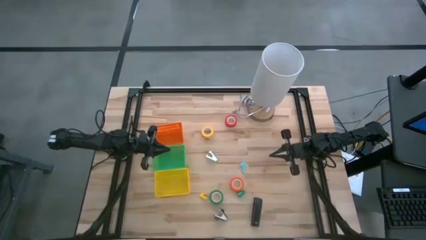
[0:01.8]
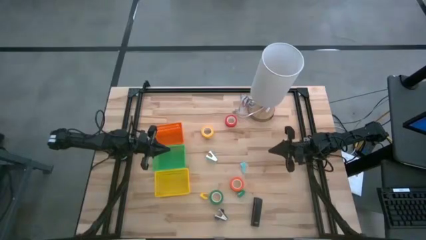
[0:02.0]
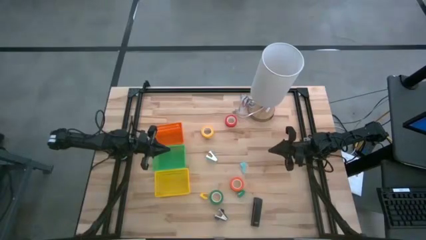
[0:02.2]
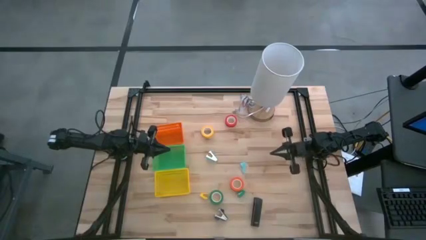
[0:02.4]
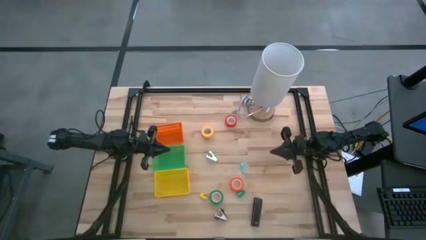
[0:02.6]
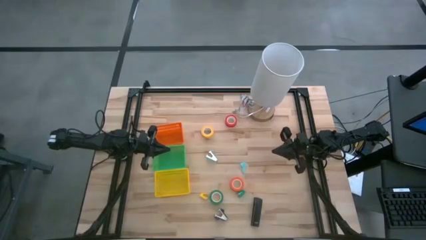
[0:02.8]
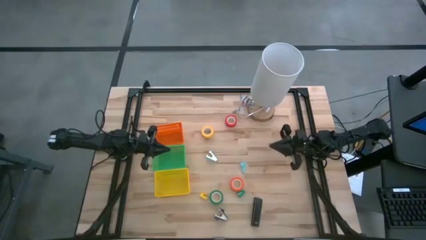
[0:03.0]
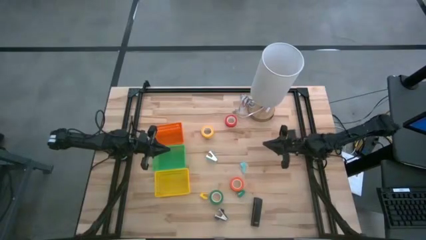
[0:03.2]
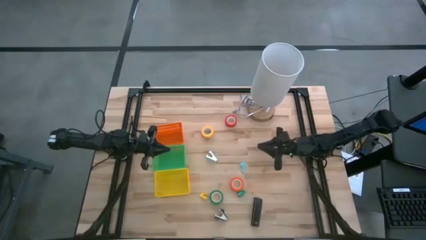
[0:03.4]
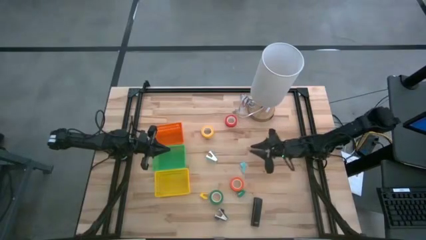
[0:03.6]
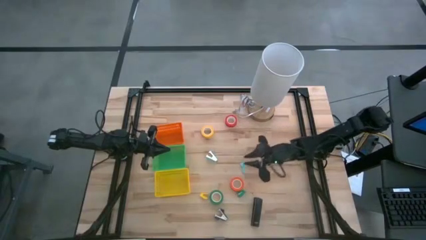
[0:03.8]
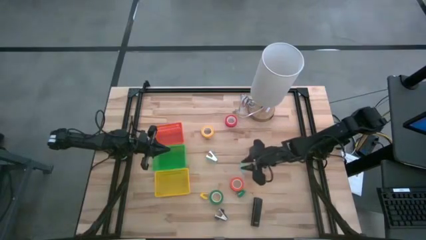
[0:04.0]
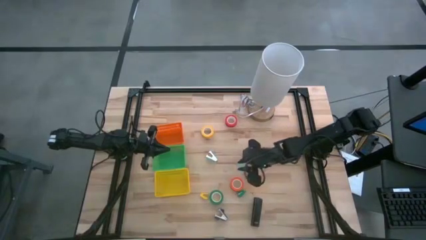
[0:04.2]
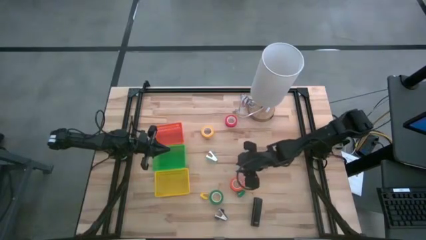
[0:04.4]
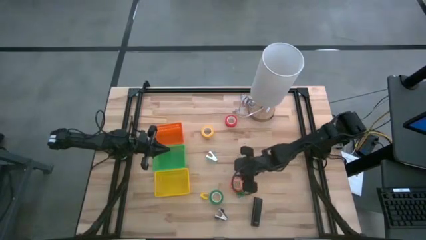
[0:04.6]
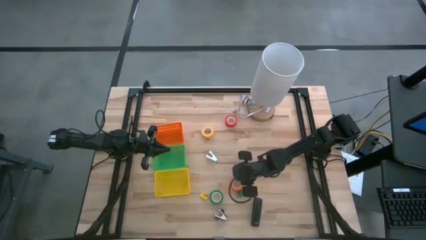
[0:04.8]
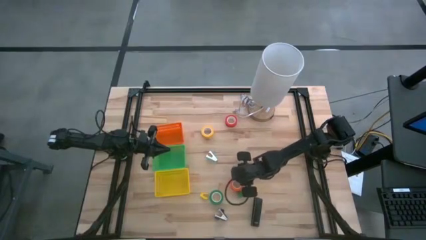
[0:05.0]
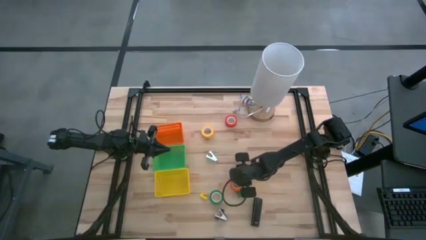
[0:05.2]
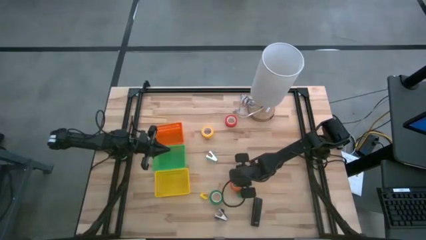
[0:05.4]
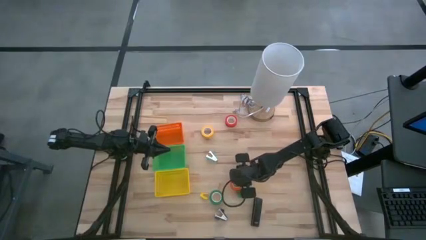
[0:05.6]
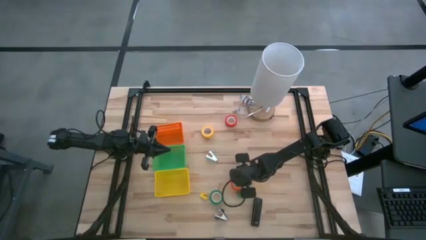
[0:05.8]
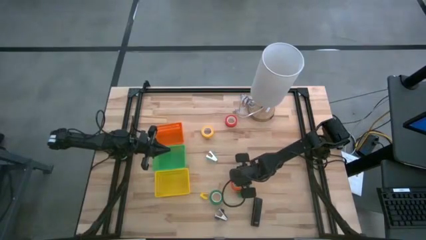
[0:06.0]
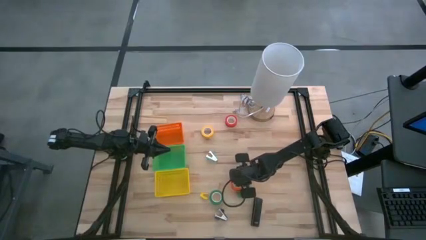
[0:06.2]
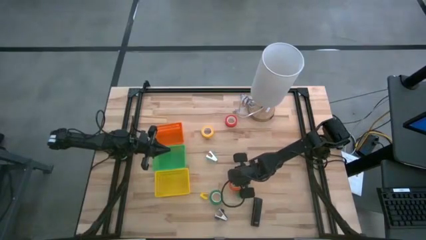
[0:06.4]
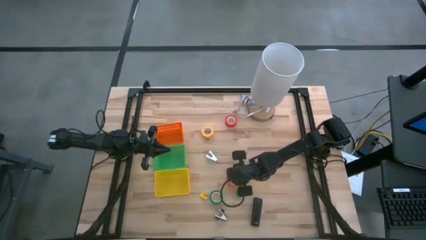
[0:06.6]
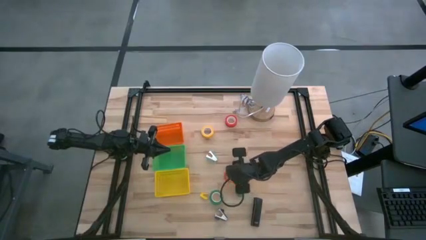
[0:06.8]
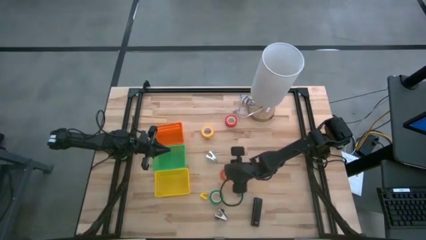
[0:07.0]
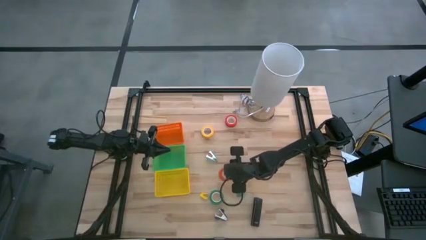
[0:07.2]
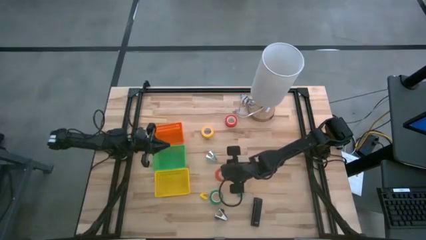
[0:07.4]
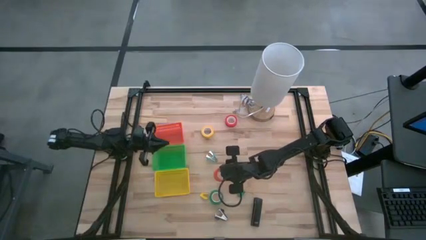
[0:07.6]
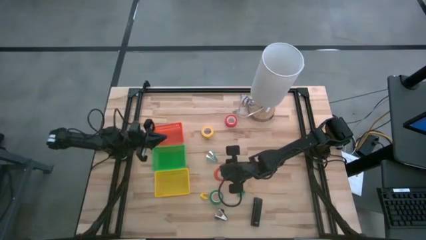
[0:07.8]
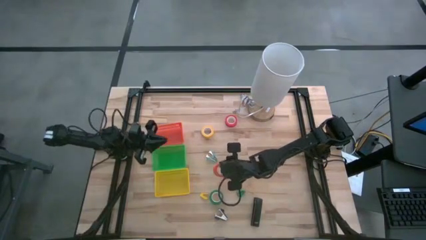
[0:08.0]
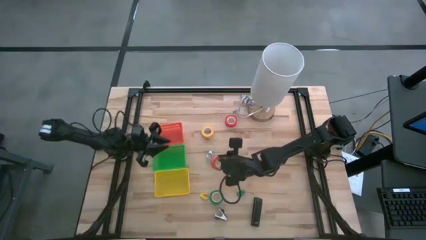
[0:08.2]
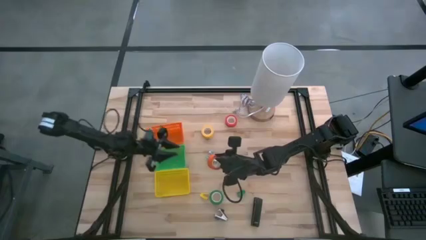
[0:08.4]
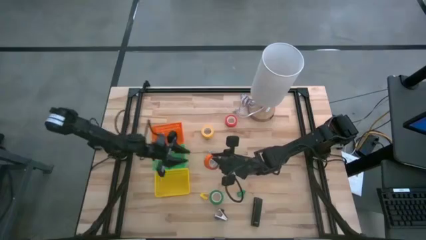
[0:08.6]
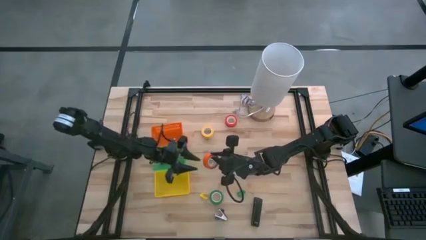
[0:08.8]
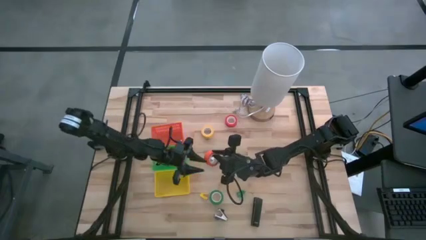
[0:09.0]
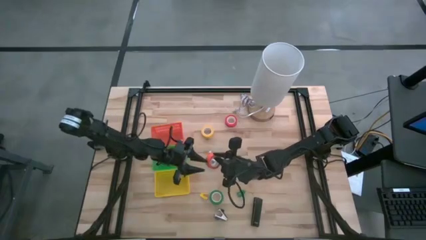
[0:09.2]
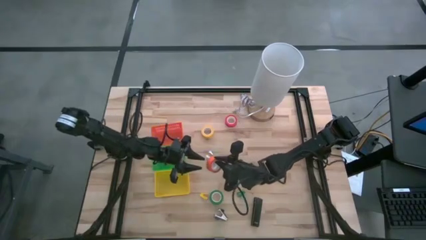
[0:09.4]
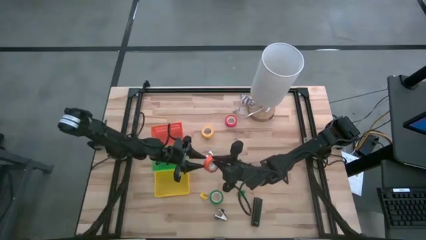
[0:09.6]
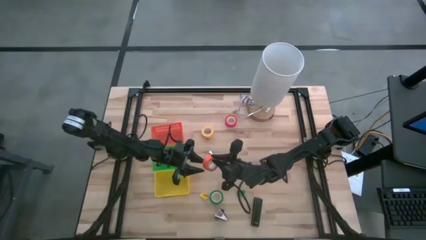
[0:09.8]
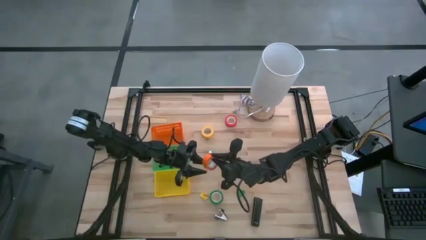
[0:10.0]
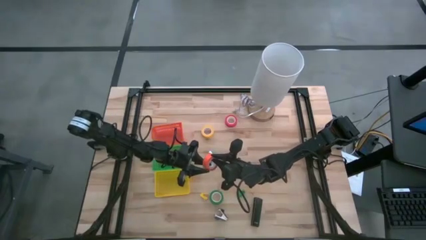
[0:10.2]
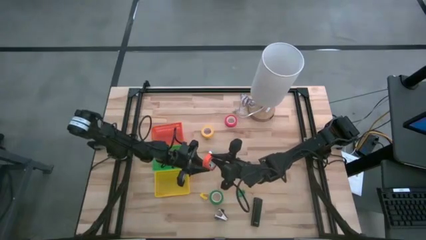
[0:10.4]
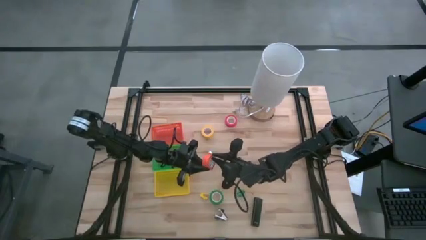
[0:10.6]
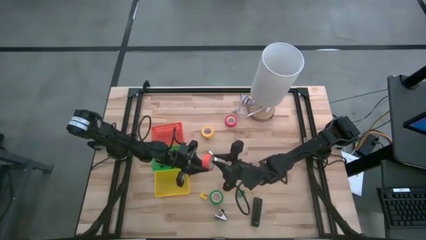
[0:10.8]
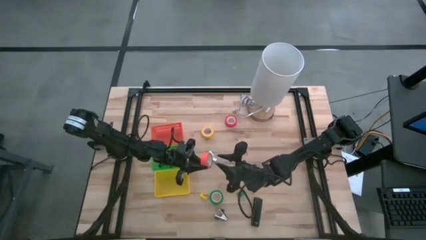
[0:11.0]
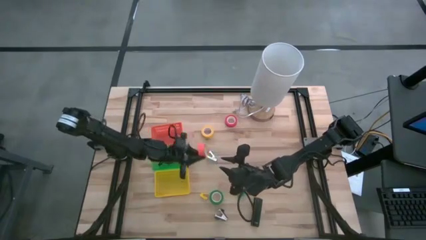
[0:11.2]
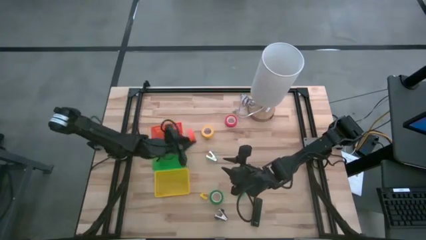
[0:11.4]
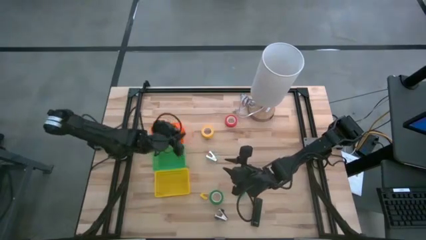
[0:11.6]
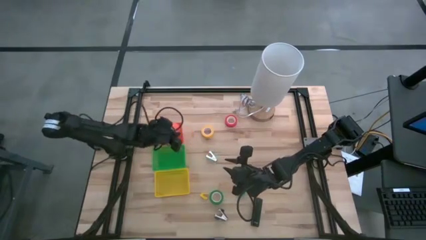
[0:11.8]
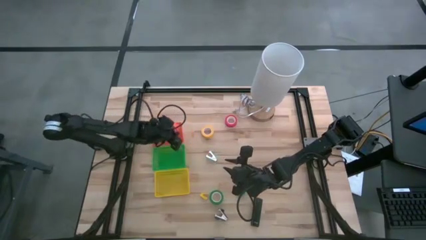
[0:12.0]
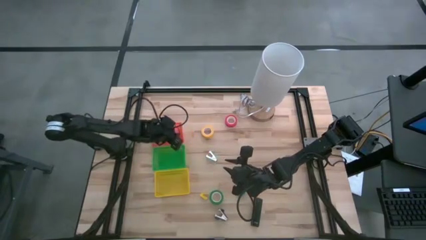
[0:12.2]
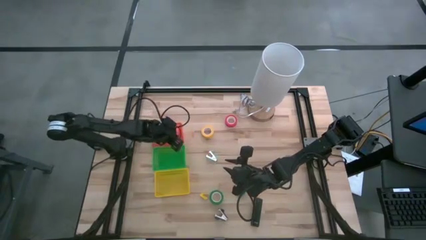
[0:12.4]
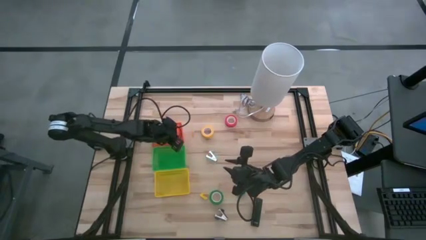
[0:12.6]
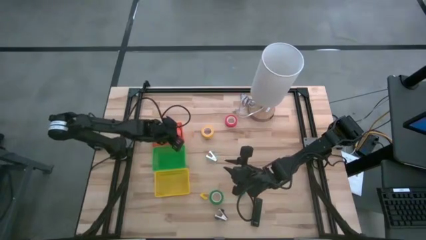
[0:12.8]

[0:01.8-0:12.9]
Task: Pick and place Stapler, Stapler remover, tape
Put the orange tape into the orange basket

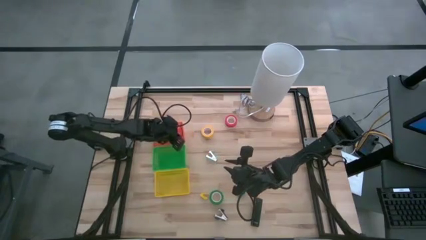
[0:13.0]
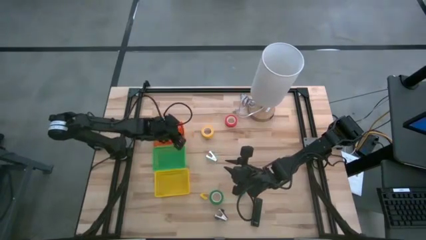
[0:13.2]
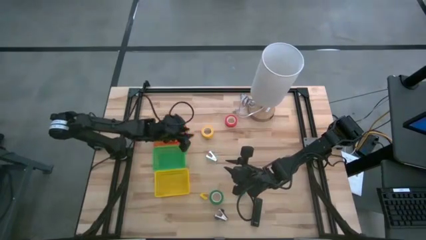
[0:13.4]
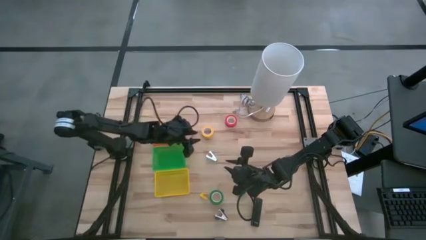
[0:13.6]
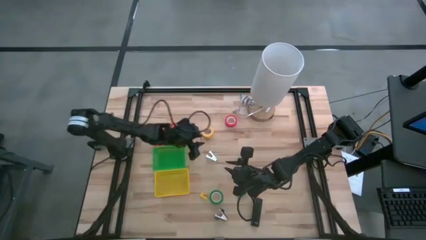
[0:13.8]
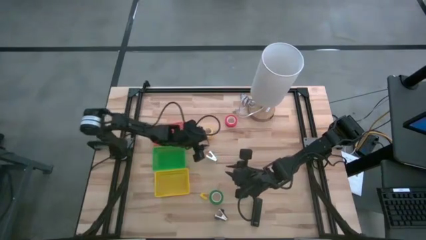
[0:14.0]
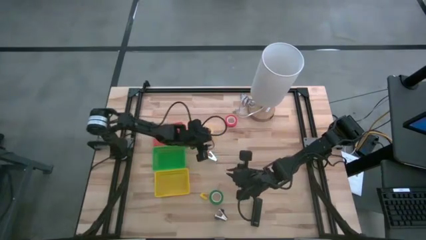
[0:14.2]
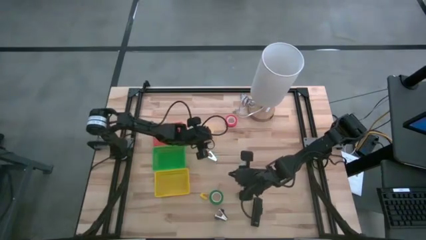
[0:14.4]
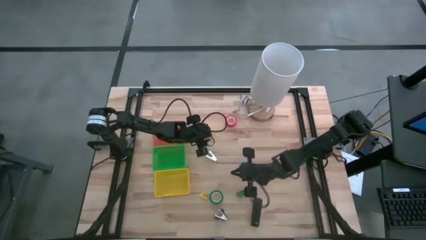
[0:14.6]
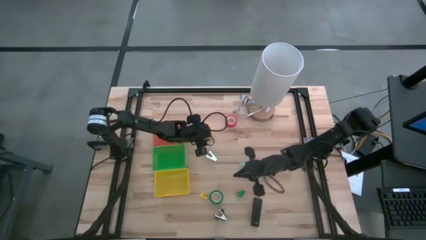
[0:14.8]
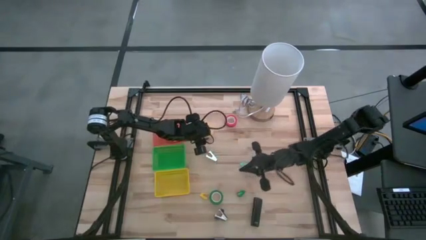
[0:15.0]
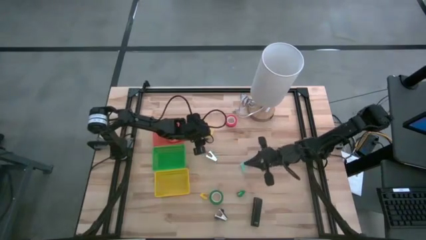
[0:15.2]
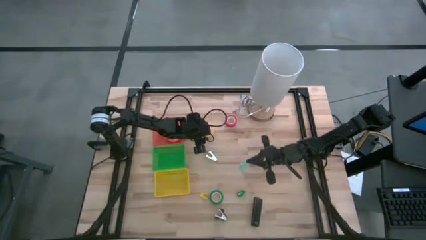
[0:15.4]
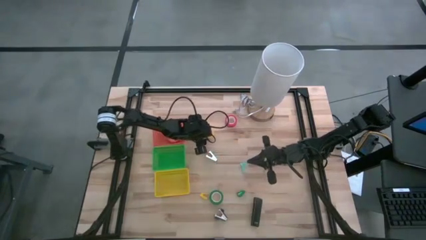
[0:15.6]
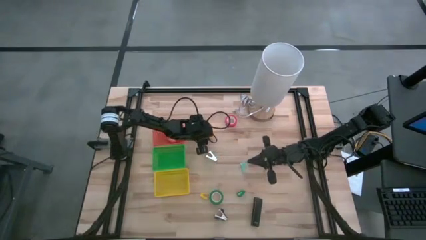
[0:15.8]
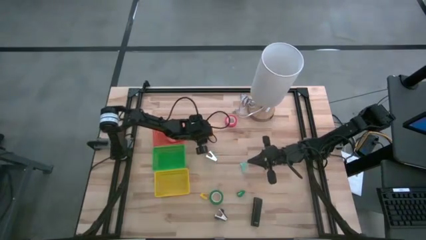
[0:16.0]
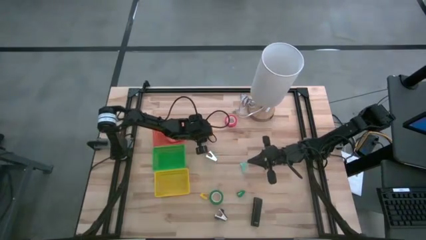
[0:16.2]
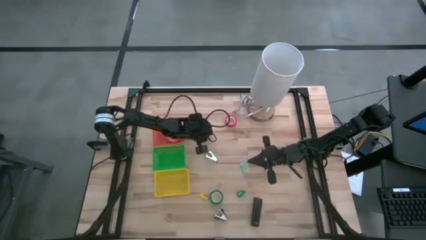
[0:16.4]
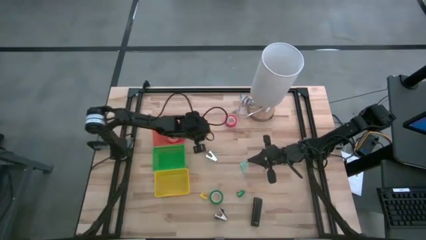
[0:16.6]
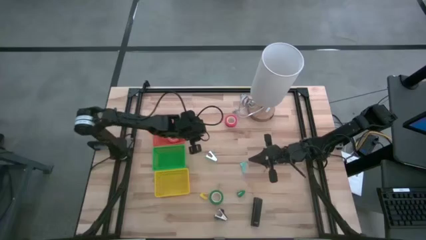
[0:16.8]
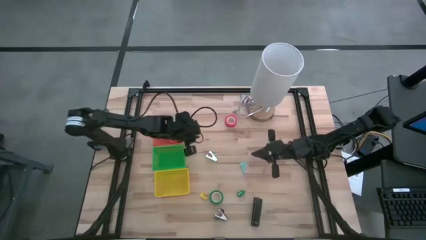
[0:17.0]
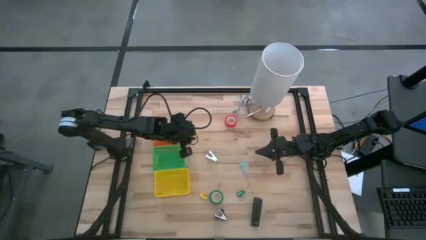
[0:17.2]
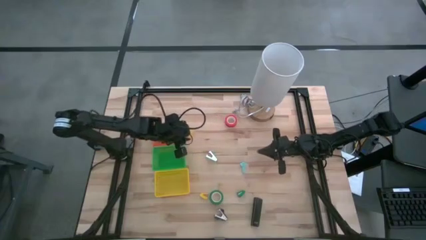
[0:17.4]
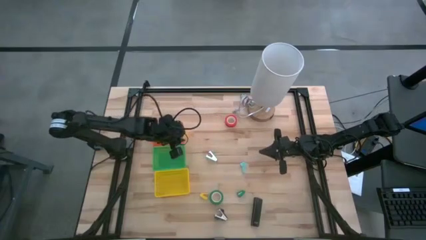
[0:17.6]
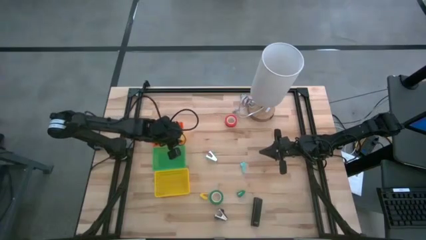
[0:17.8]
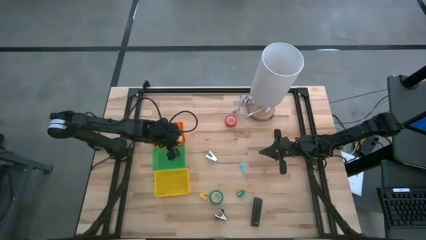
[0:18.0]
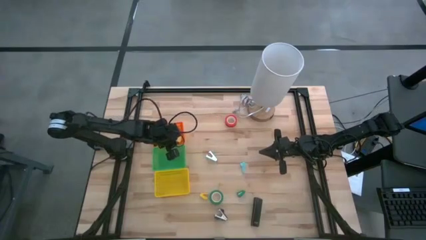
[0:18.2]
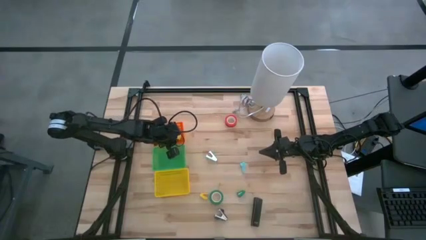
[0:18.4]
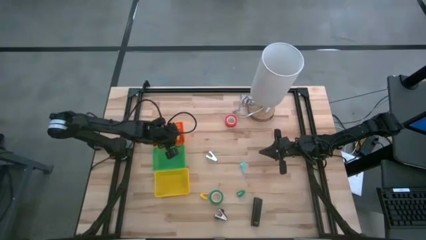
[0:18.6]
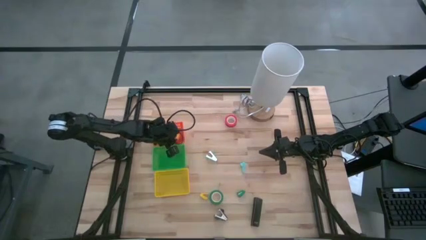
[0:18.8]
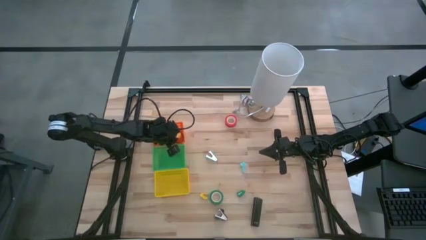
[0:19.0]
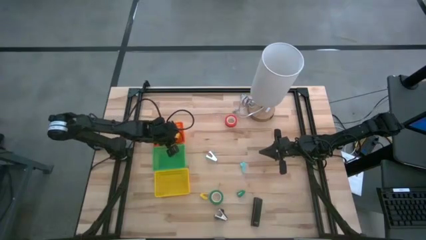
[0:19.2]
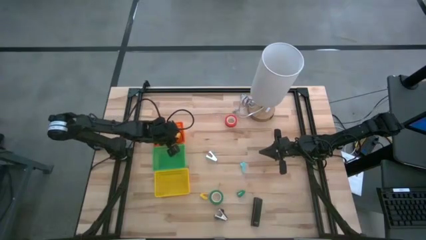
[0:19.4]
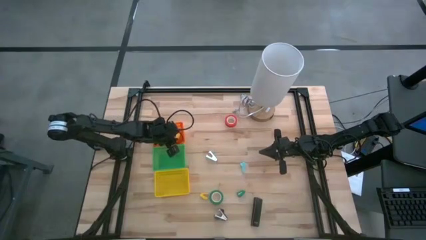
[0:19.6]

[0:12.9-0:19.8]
Put the yellow tape into the orange basket
